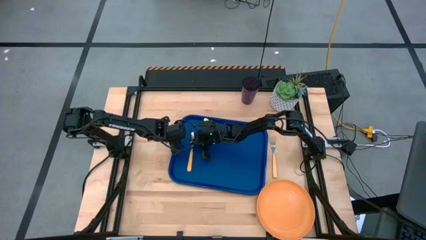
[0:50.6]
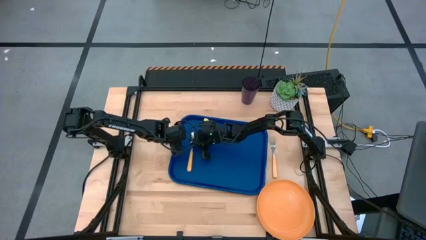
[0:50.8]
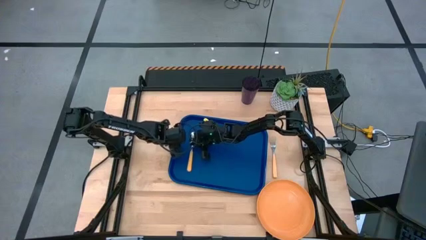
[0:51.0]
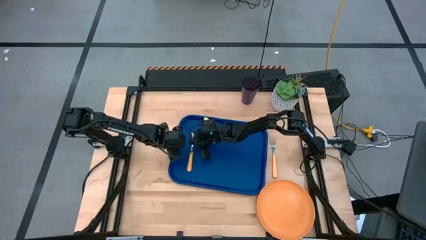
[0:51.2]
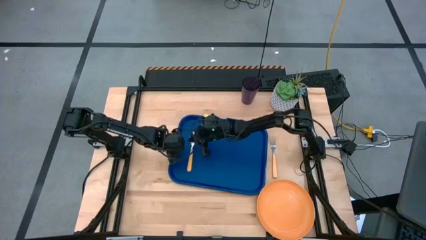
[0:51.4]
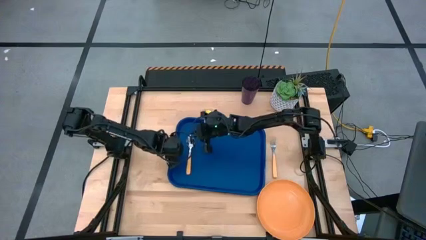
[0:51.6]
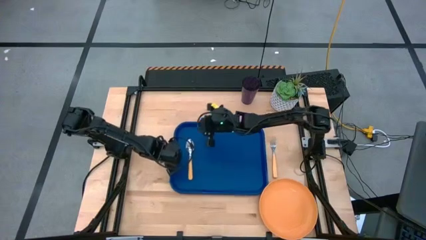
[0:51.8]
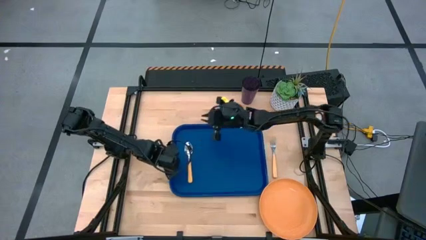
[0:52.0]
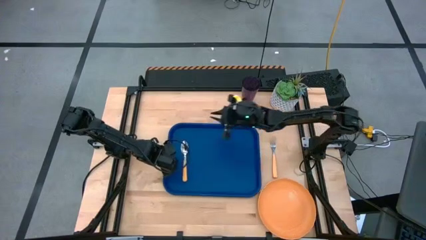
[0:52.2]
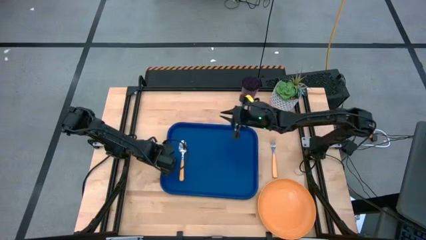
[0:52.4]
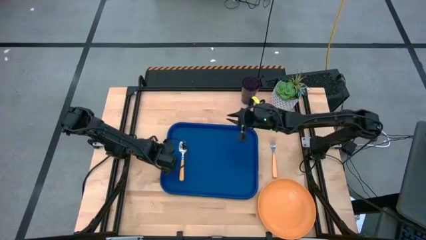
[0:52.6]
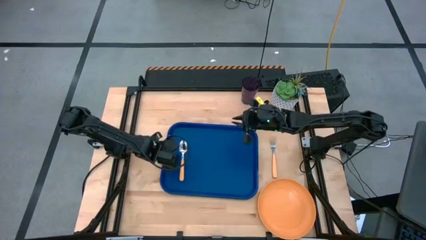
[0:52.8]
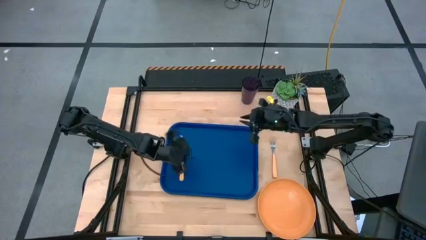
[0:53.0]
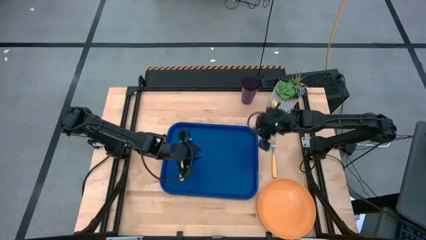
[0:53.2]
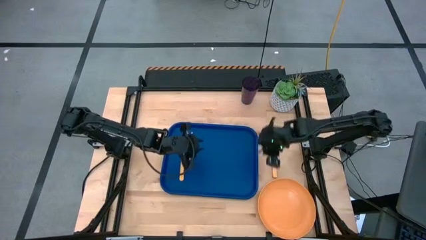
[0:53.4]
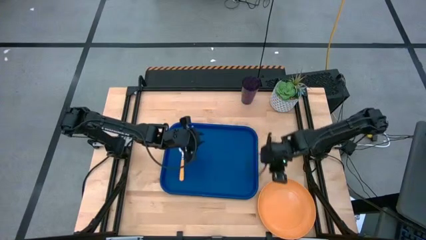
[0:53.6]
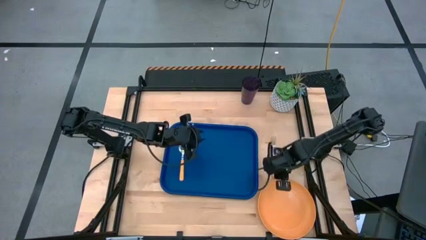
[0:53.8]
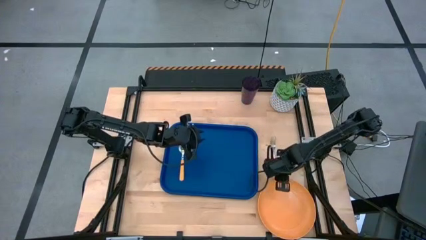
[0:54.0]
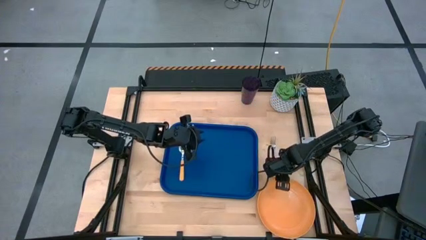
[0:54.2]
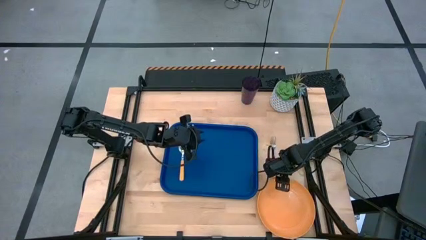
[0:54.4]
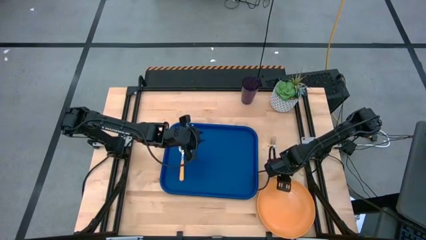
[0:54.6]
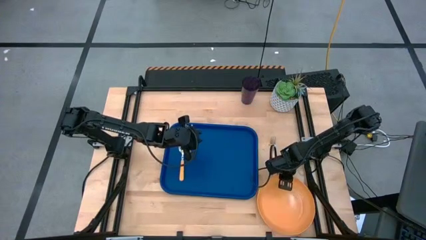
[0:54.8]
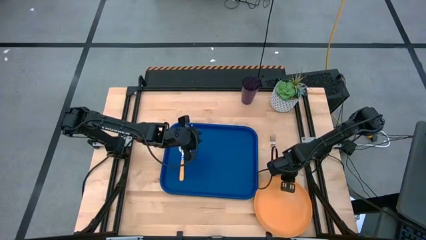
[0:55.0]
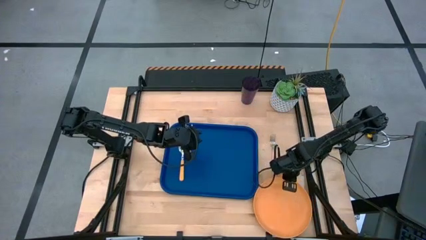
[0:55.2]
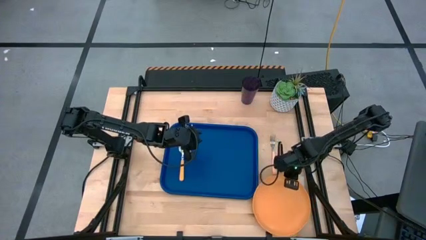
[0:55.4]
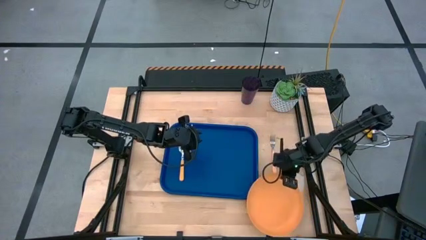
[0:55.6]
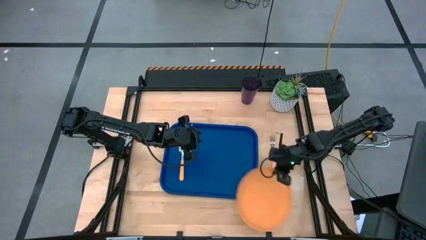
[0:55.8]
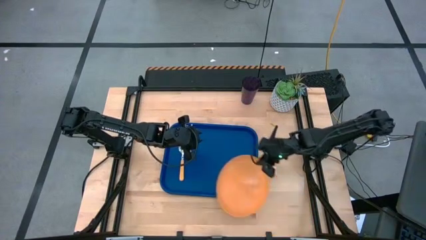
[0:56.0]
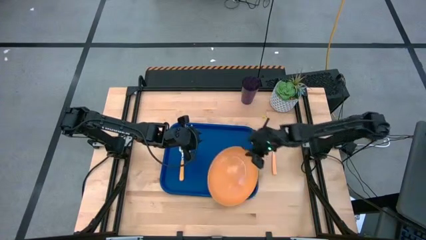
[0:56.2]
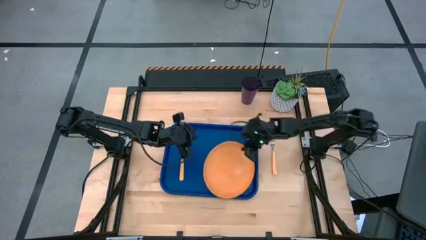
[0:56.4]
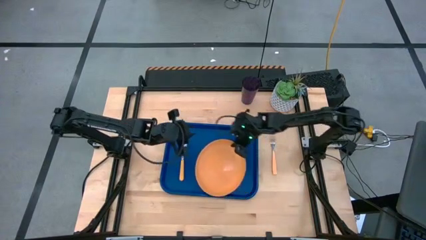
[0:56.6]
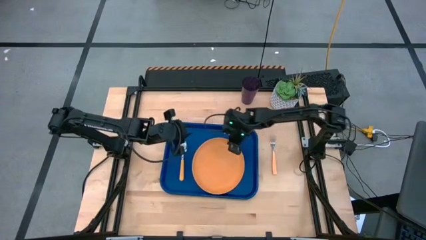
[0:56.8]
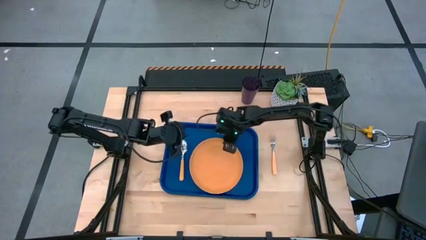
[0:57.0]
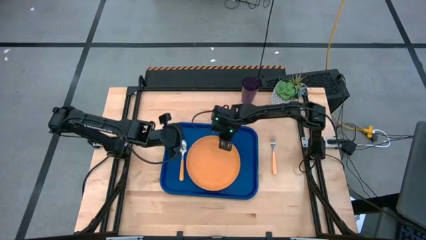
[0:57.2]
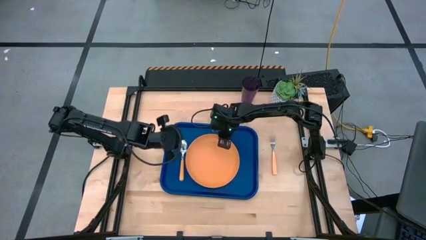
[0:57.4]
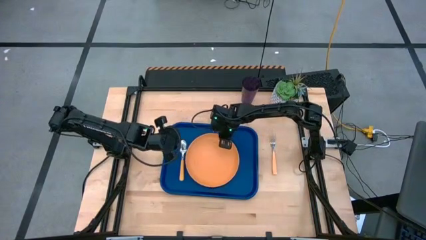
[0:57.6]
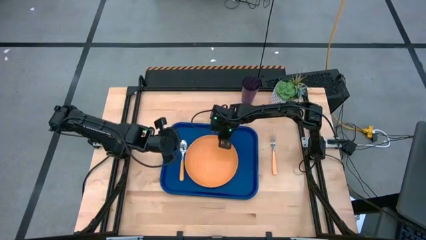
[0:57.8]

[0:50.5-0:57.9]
Task: Pick and place plate/cup/fork/spoon on tray
Put the orange plate on the blue serving tray to the right of the yellow spoon

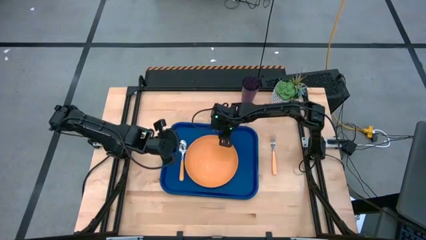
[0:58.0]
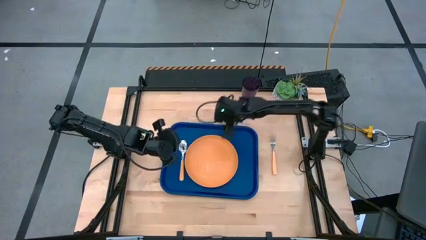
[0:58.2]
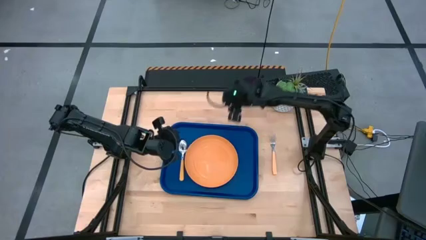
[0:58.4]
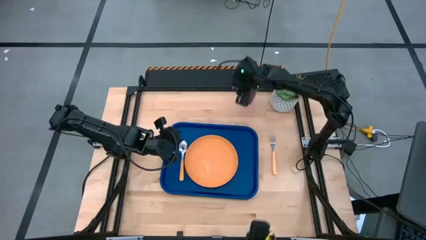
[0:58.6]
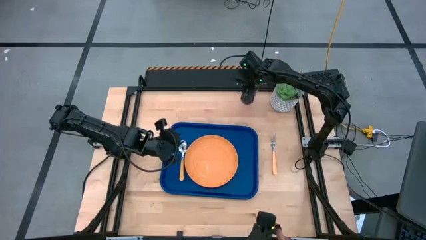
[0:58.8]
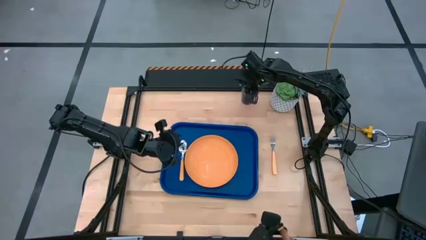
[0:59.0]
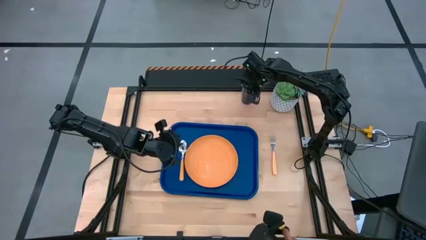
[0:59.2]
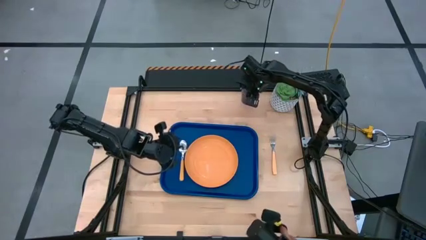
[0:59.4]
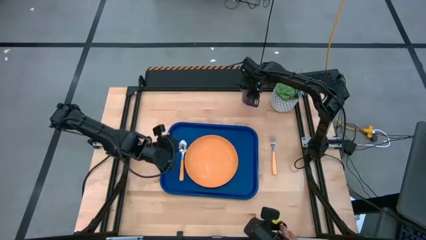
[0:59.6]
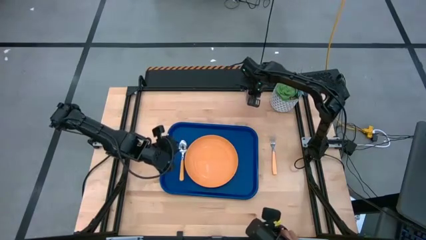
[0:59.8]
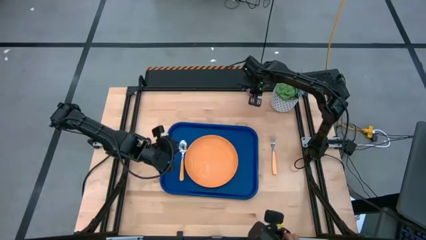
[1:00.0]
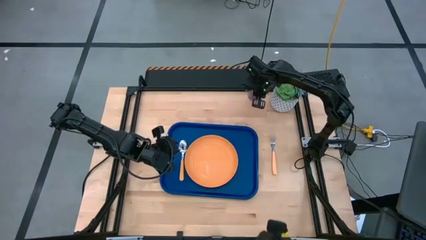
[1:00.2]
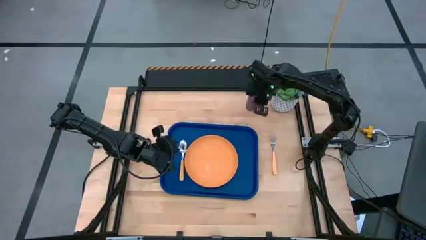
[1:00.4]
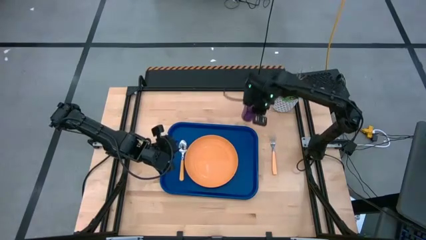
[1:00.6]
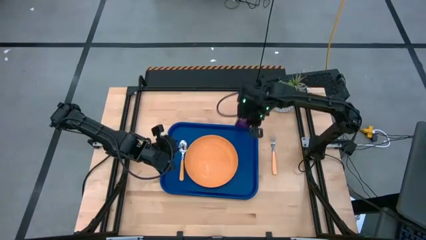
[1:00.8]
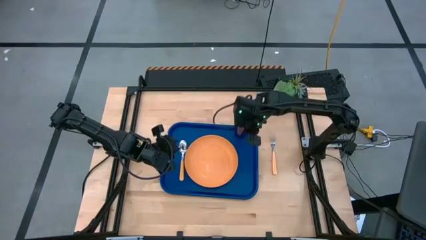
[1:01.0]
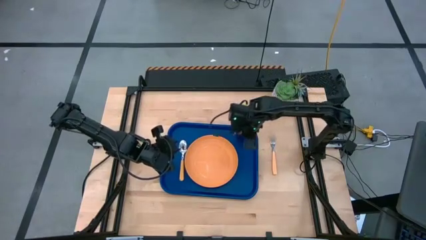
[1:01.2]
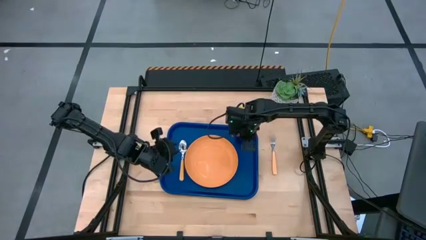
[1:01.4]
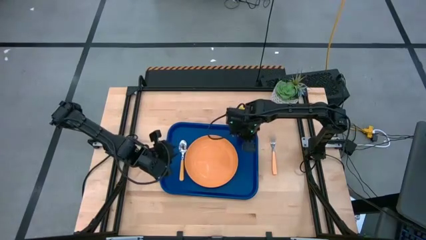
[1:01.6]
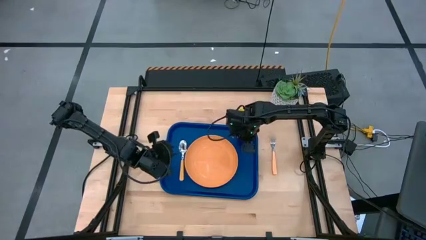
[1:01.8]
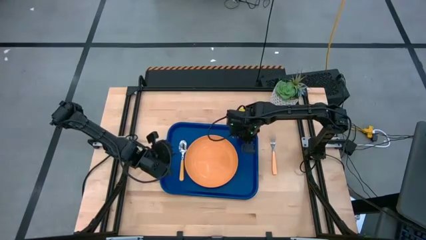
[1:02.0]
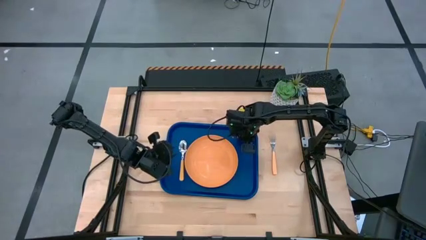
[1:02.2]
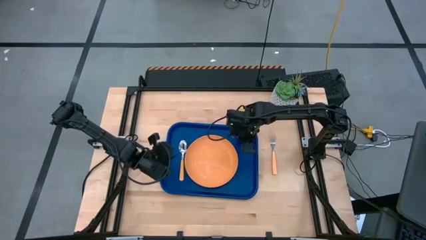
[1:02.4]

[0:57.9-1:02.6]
Put the purple glass on the blue serving tray to the top right of the orange plate

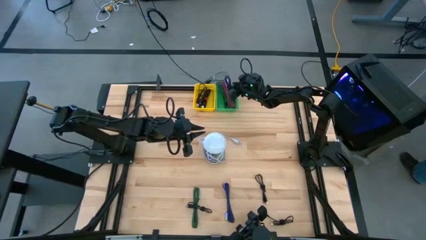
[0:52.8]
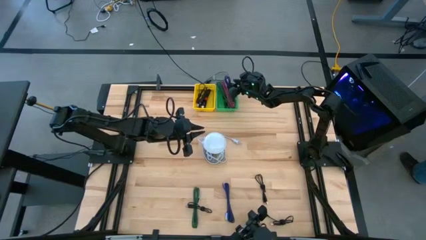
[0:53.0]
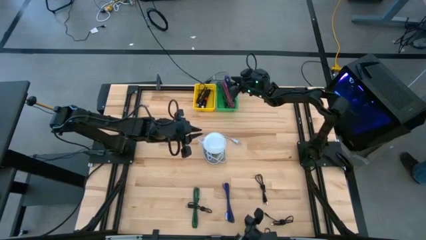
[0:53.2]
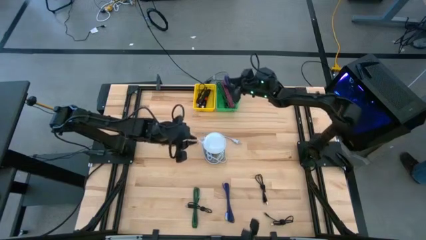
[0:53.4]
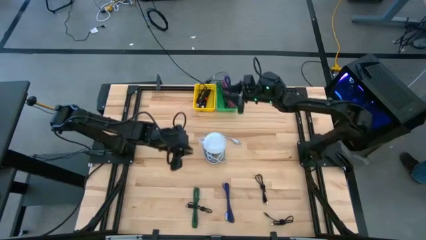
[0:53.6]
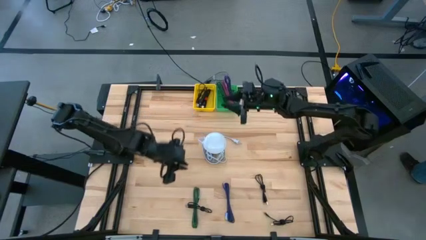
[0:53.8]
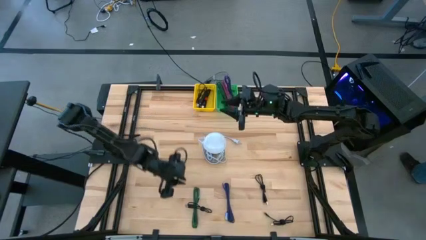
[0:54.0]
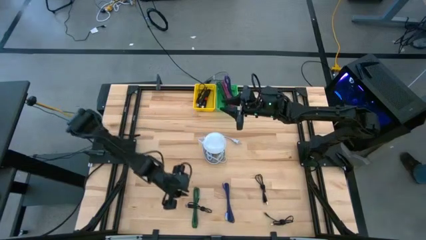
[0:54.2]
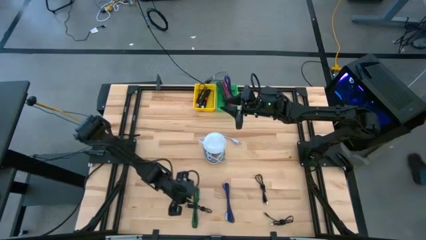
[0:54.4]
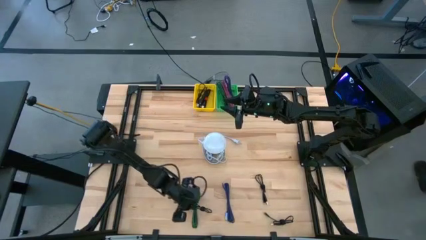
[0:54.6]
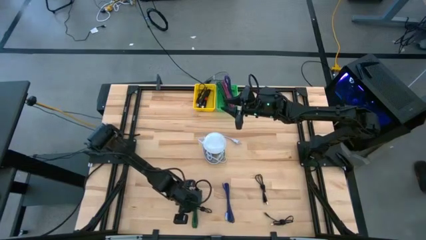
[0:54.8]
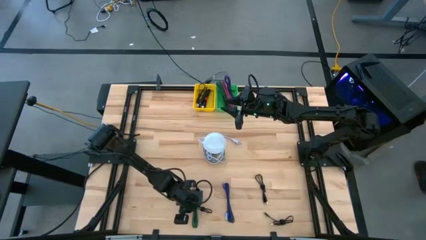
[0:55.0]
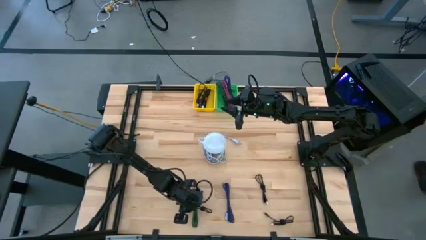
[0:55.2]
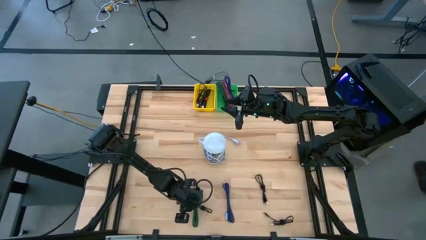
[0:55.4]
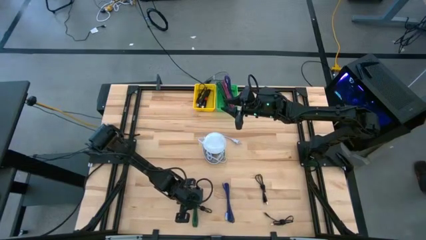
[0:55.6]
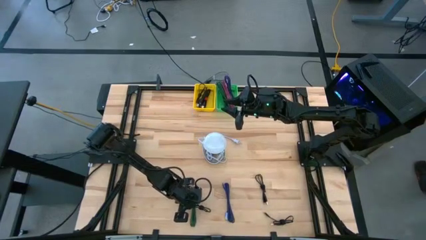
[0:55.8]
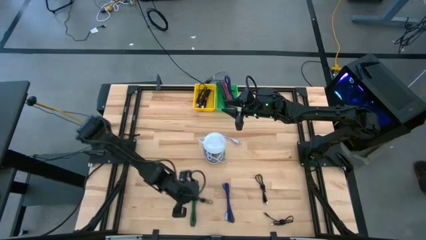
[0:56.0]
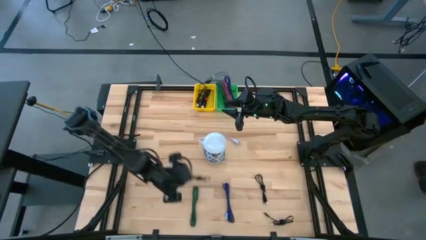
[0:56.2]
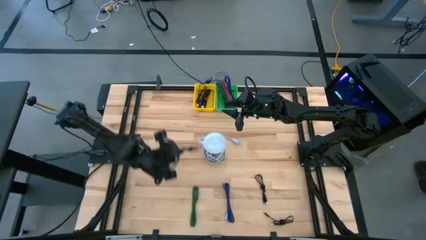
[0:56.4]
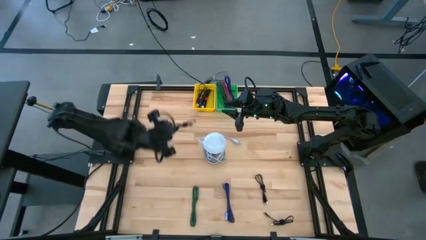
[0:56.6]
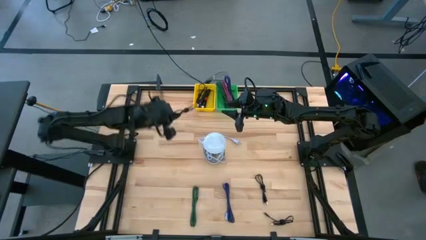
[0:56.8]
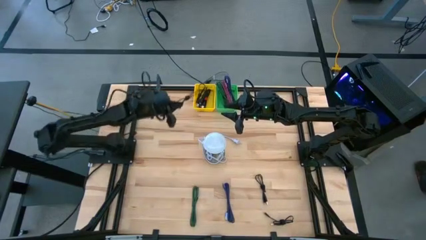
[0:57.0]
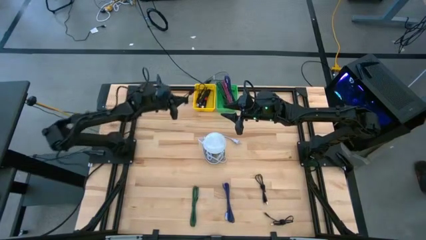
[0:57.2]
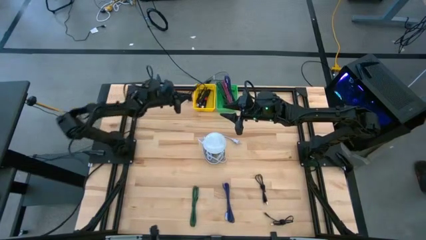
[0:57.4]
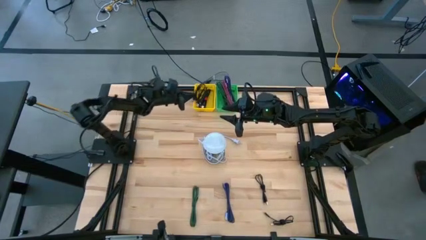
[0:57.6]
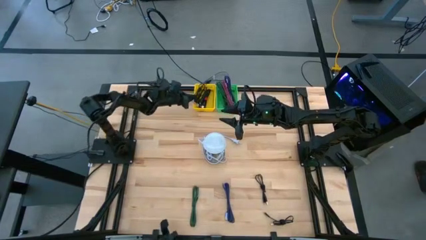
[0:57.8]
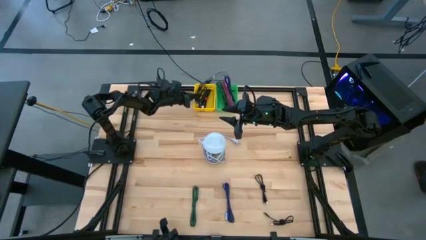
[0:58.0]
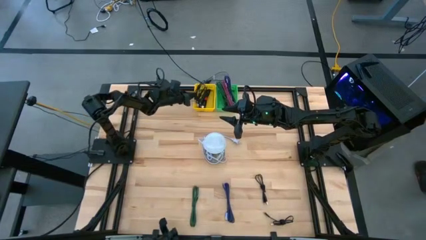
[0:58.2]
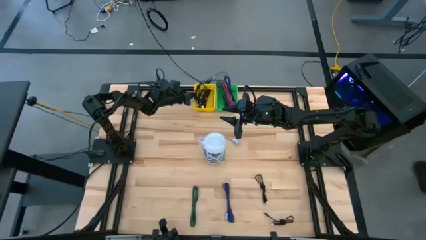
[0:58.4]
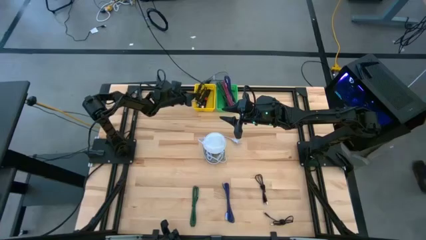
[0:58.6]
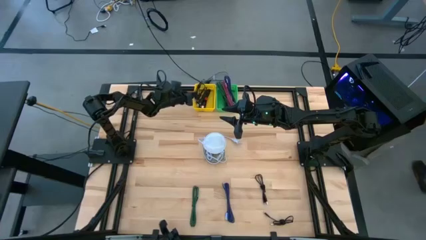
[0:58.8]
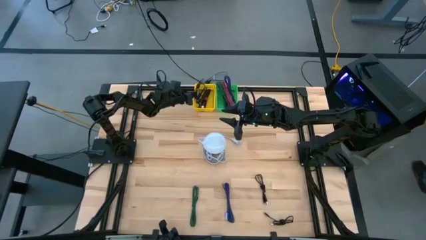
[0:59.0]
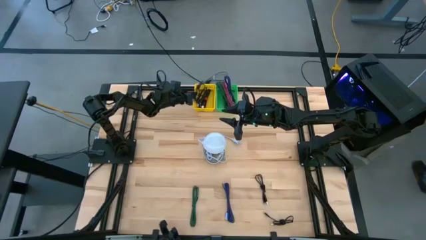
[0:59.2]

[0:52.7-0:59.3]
Task: Pick & Place USB Port
Put the black charger cable into the yellow bin
